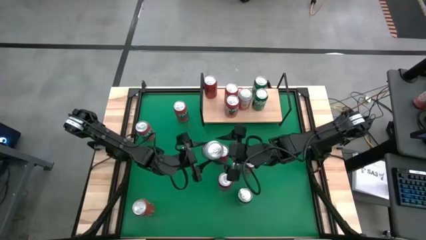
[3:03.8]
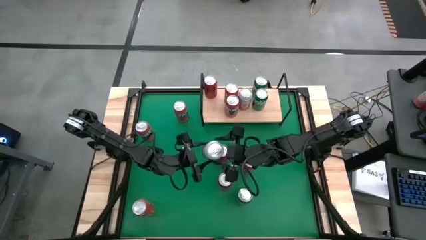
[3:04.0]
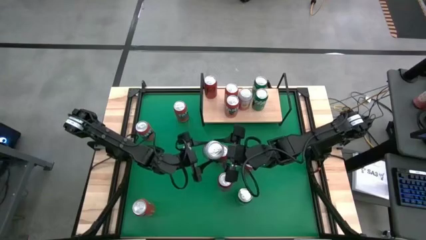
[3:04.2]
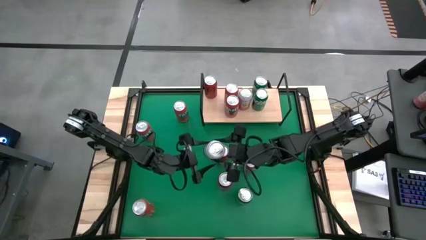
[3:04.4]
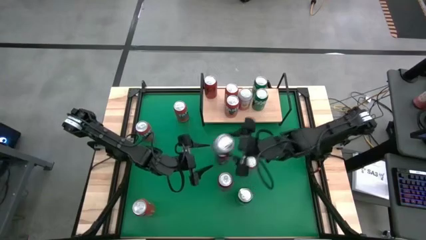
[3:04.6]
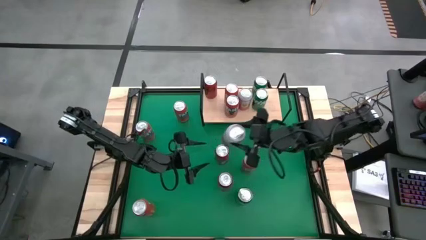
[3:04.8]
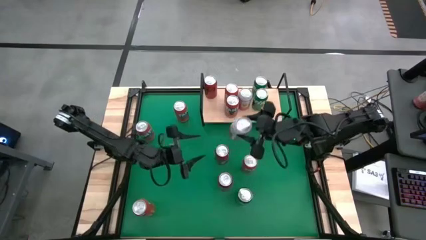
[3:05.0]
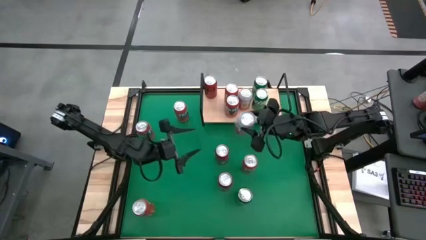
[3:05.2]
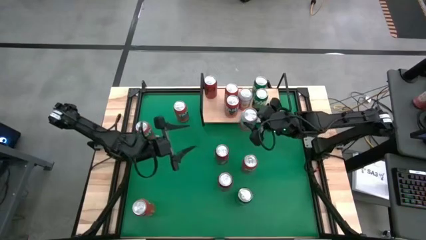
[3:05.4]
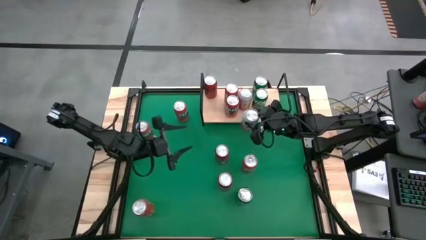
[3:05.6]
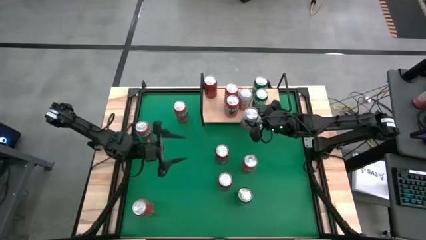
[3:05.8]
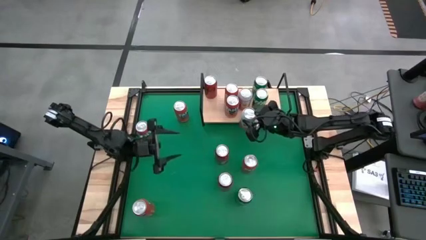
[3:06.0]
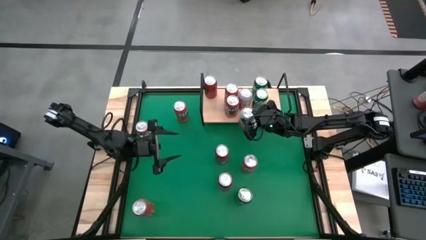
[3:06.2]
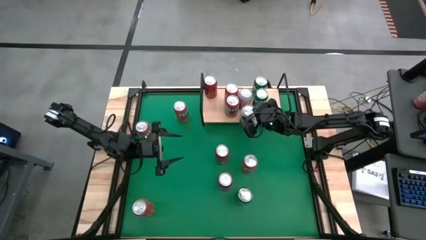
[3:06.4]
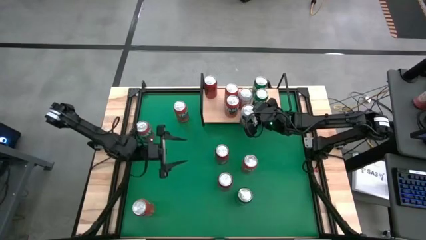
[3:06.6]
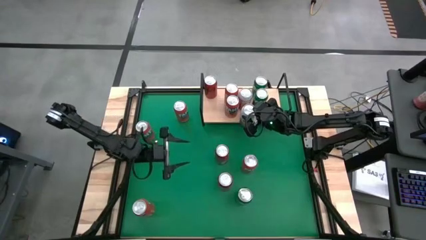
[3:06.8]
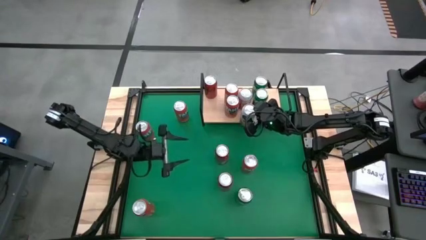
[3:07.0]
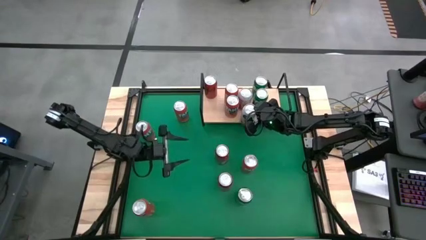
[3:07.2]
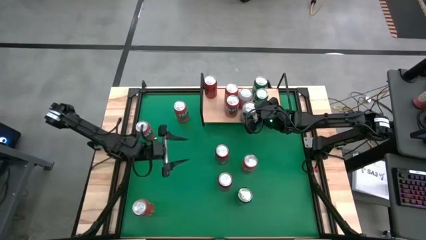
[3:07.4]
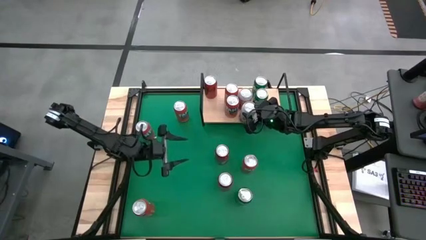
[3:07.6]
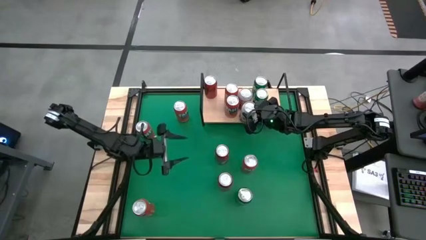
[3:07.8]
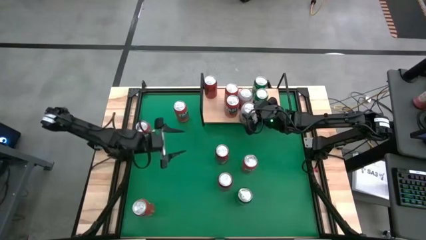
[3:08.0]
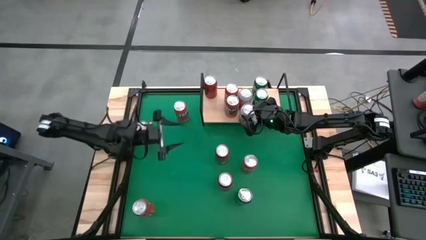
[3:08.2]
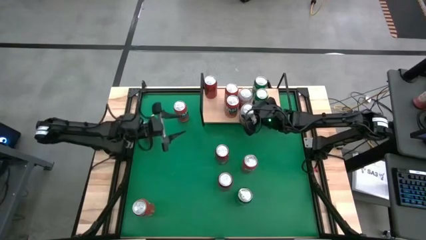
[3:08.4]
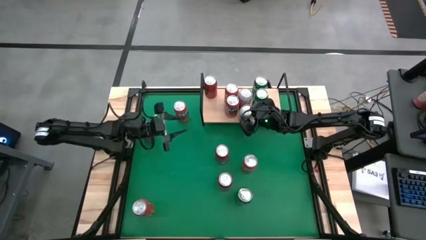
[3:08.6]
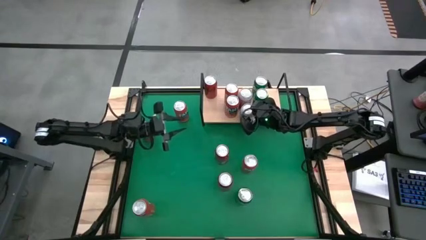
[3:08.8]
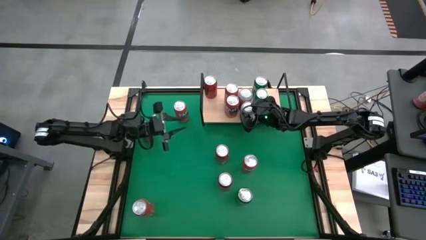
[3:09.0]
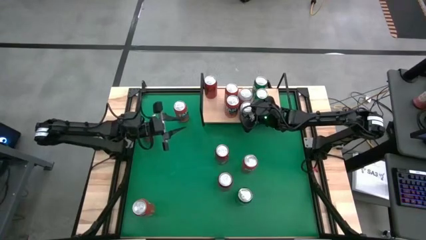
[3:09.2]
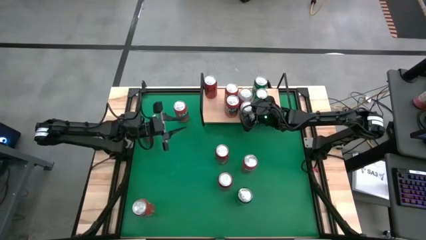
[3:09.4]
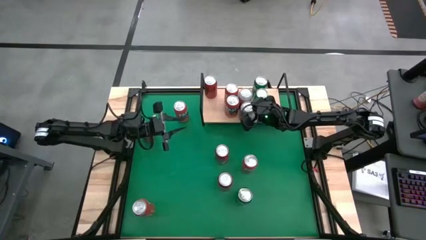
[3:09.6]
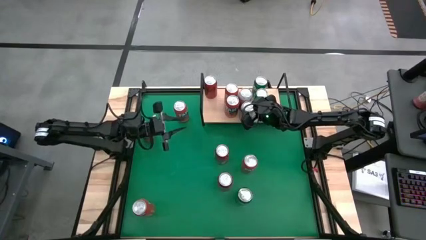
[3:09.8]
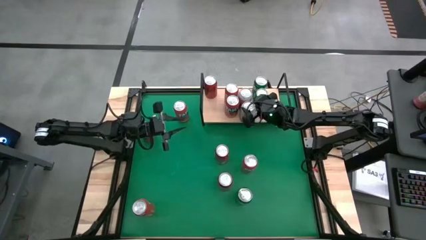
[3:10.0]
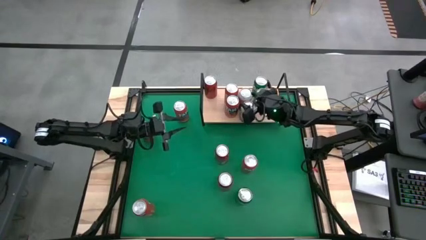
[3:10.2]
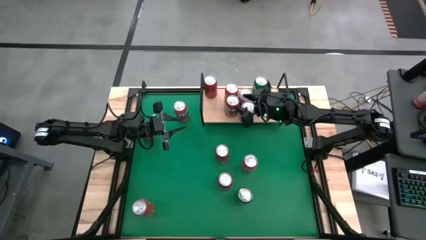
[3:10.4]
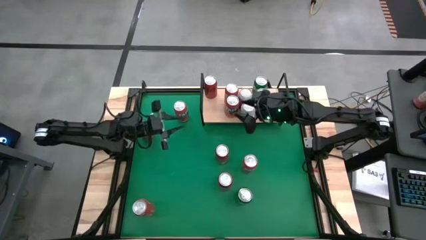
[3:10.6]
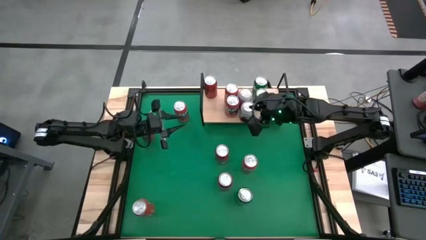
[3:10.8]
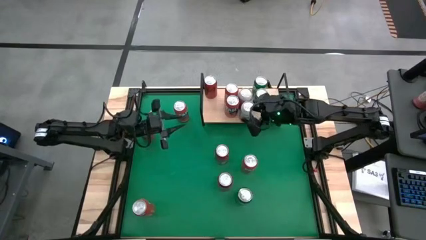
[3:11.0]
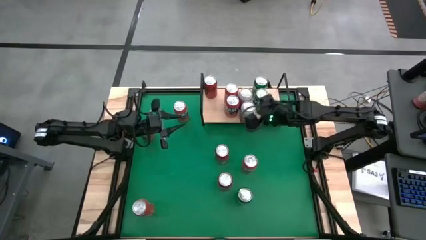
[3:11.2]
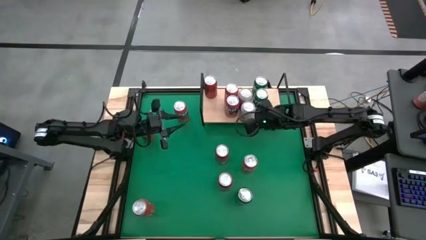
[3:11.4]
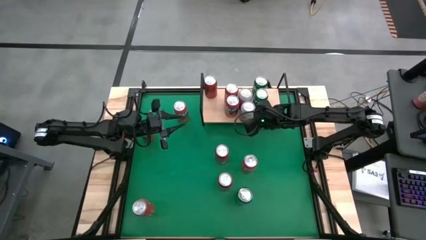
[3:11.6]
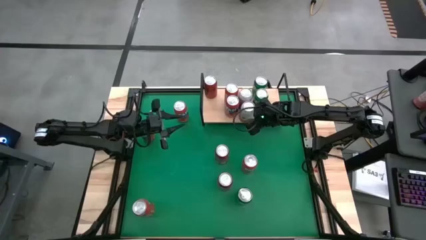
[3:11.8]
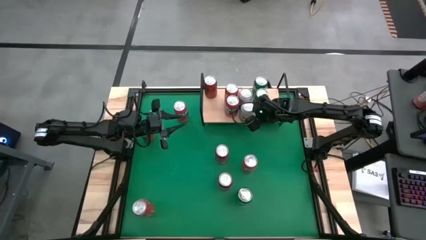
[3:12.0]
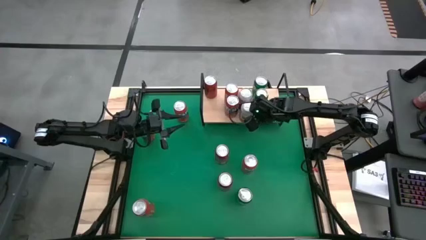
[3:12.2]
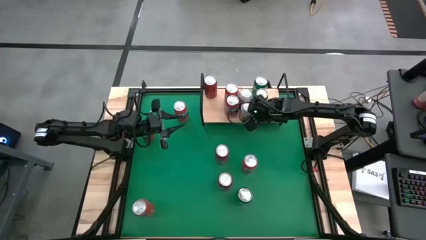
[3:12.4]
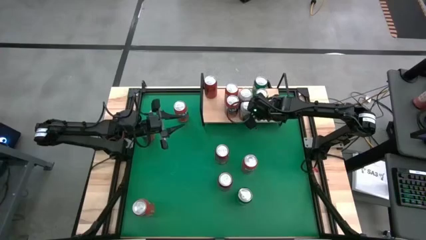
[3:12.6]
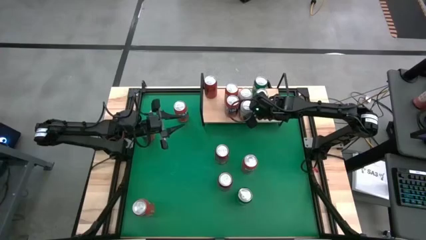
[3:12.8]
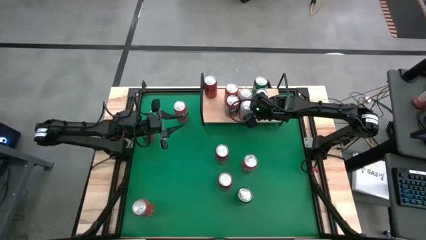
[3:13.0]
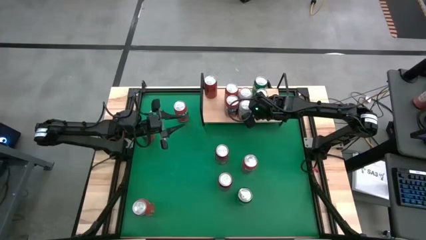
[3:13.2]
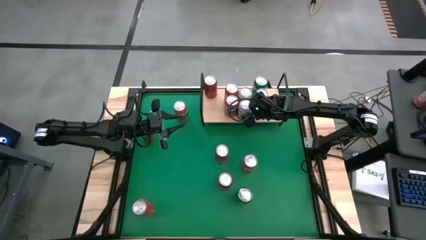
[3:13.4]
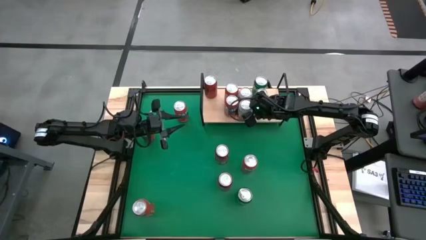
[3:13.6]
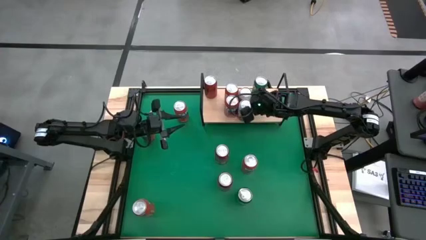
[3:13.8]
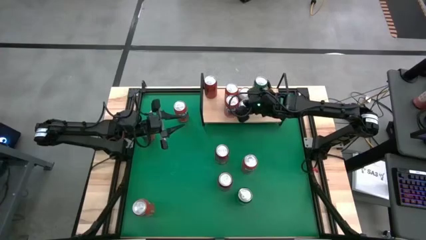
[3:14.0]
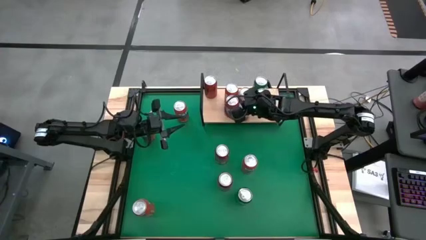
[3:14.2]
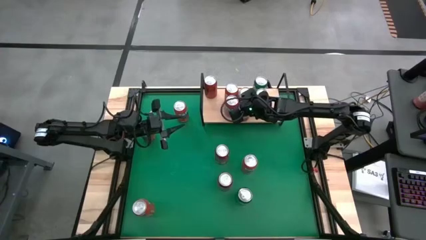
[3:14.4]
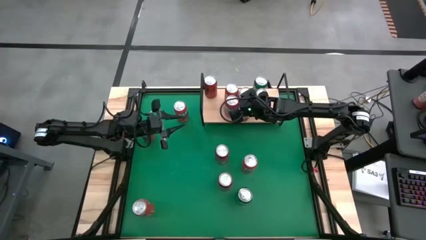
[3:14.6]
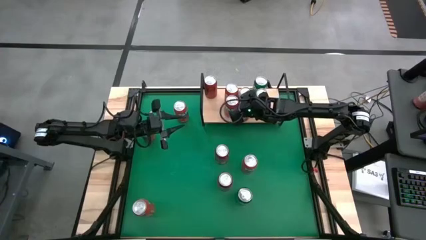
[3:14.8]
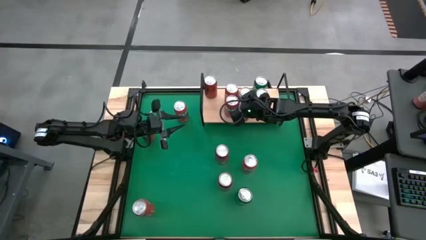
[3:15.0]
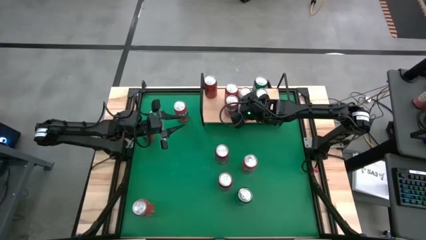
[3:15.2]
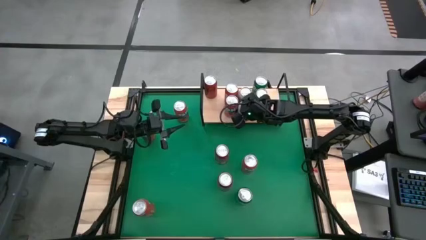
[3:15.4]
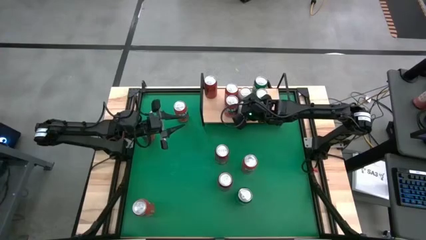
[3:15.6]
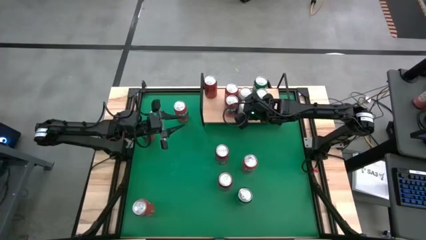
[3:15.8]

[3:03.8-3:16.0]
Task: Place canned beverage on shelf
Put the pink-white soda can on the shelf aligned with the other pink-white soda can
